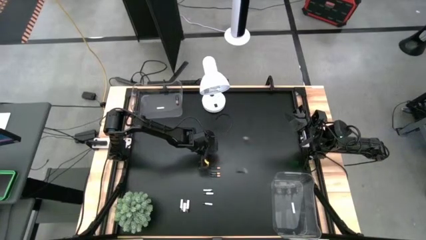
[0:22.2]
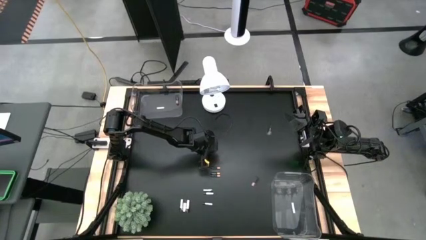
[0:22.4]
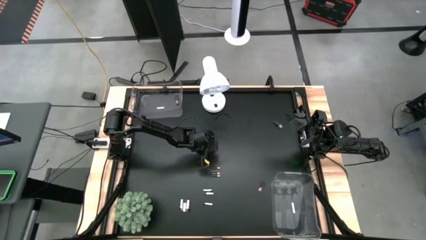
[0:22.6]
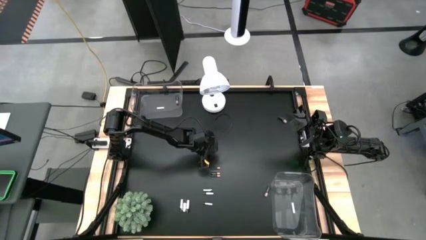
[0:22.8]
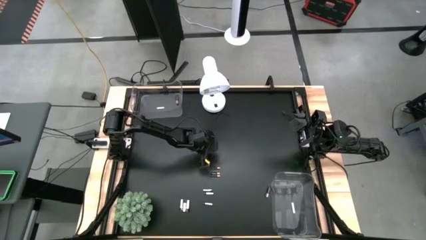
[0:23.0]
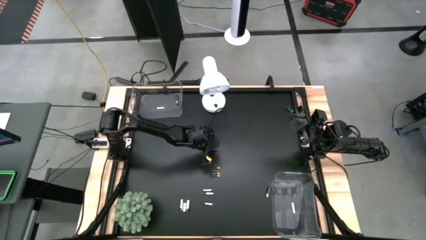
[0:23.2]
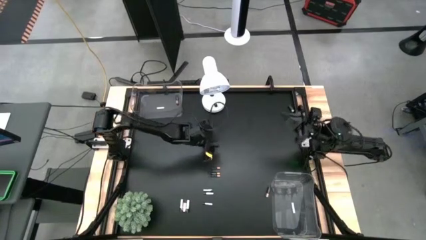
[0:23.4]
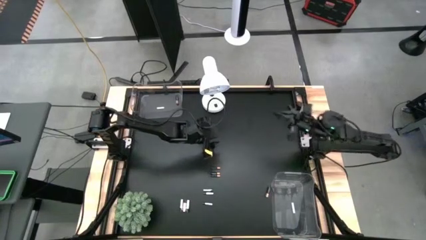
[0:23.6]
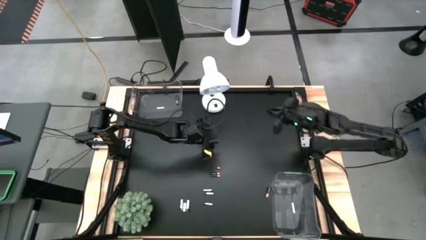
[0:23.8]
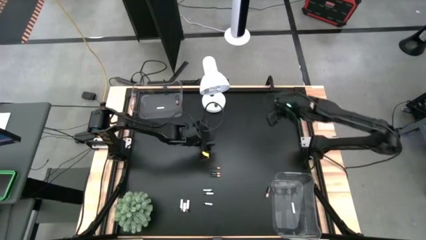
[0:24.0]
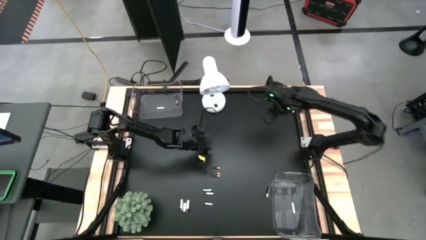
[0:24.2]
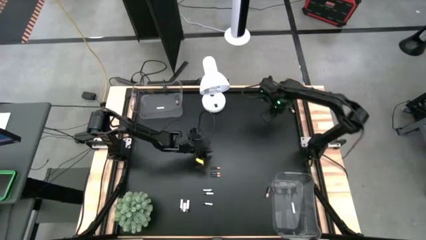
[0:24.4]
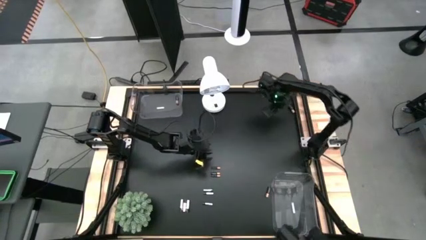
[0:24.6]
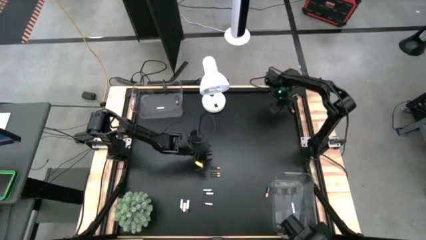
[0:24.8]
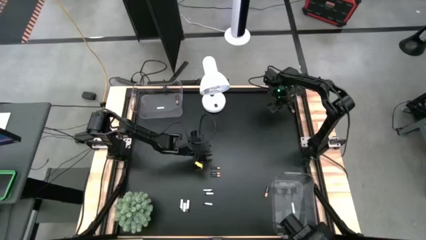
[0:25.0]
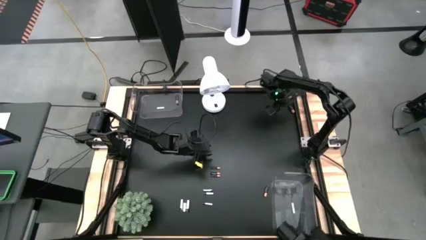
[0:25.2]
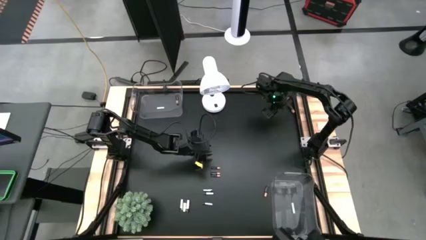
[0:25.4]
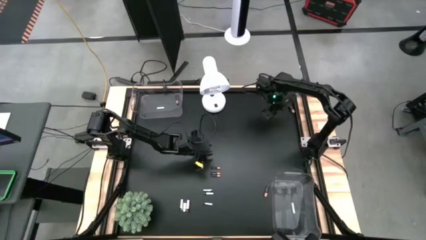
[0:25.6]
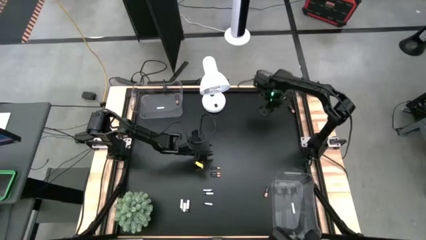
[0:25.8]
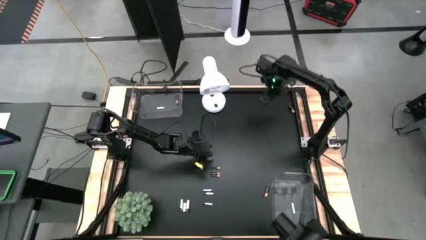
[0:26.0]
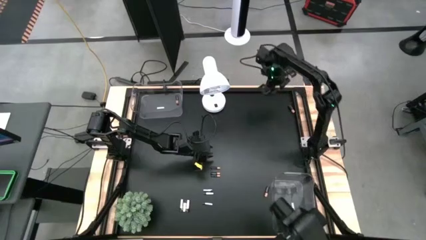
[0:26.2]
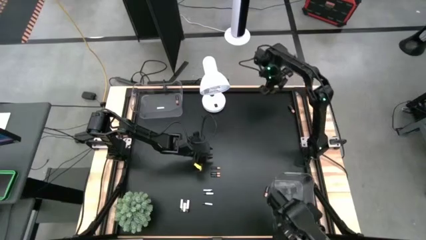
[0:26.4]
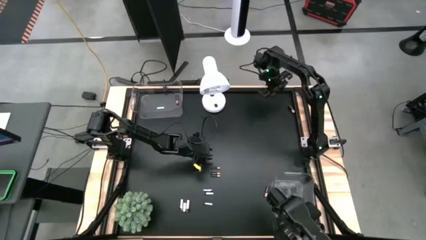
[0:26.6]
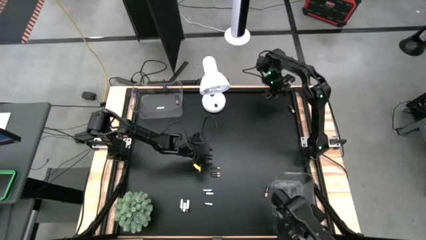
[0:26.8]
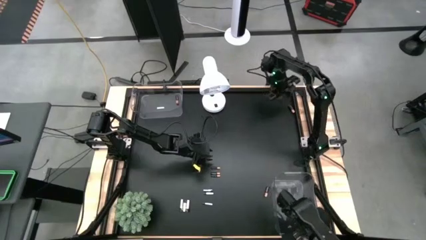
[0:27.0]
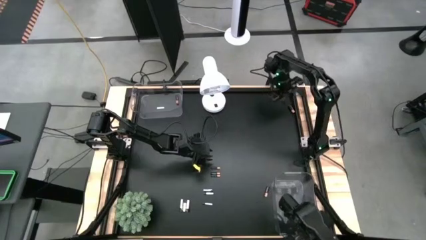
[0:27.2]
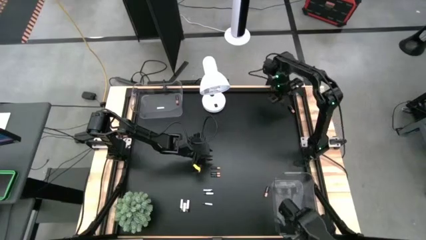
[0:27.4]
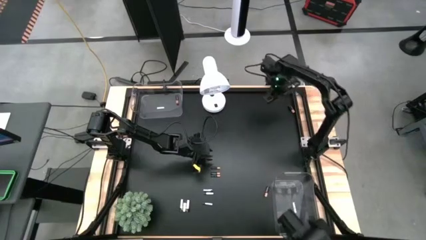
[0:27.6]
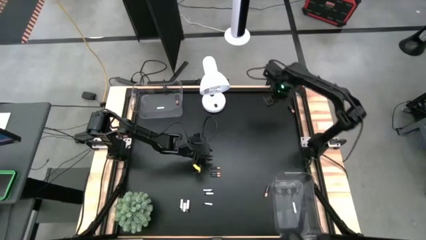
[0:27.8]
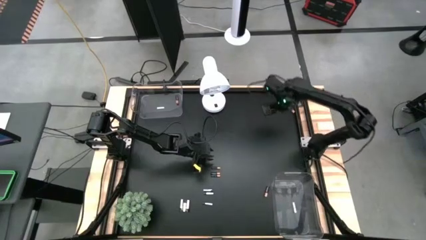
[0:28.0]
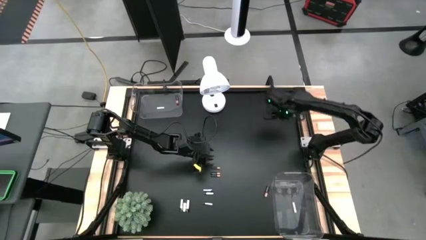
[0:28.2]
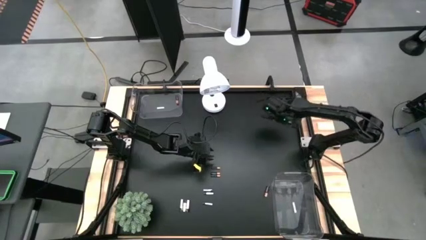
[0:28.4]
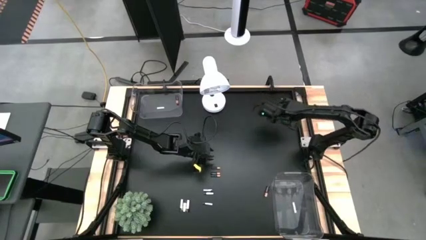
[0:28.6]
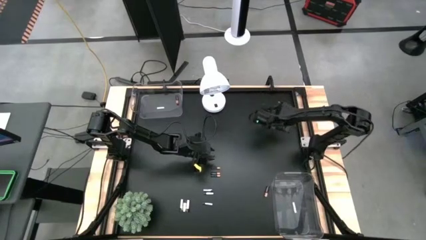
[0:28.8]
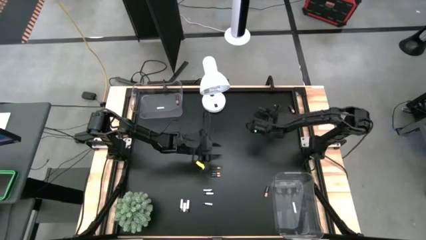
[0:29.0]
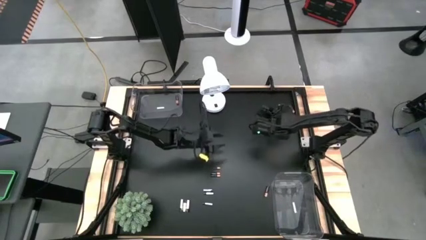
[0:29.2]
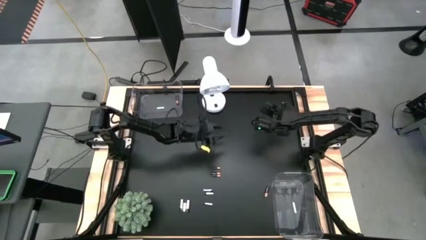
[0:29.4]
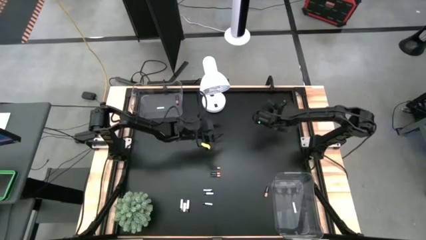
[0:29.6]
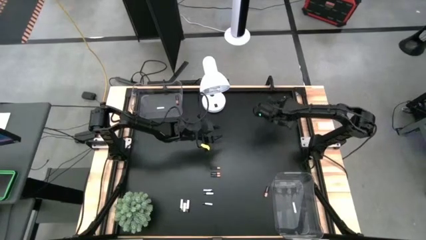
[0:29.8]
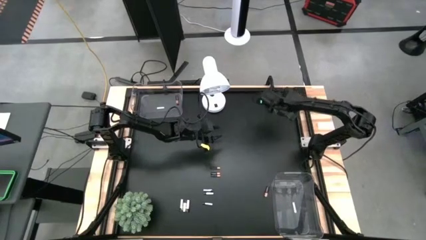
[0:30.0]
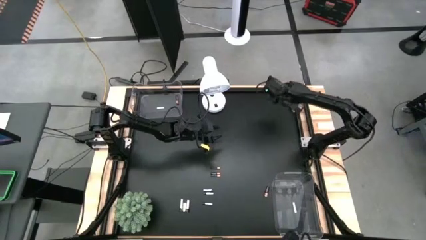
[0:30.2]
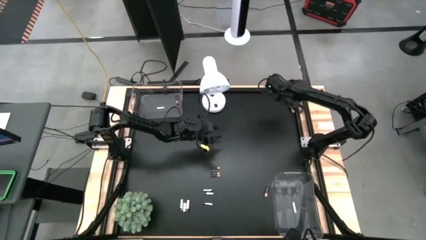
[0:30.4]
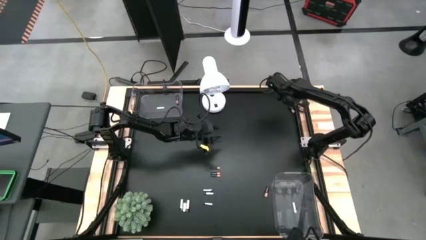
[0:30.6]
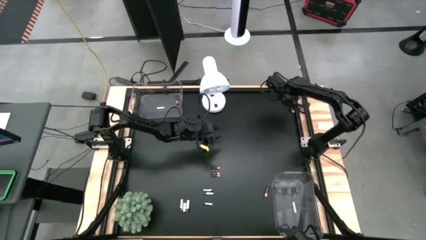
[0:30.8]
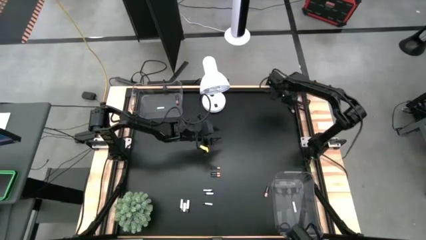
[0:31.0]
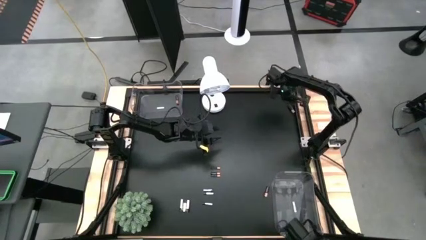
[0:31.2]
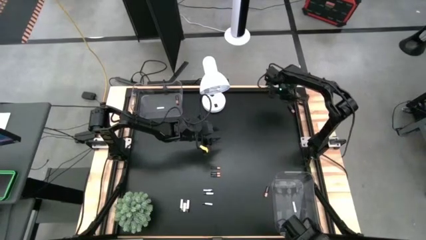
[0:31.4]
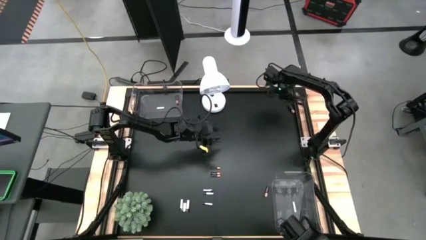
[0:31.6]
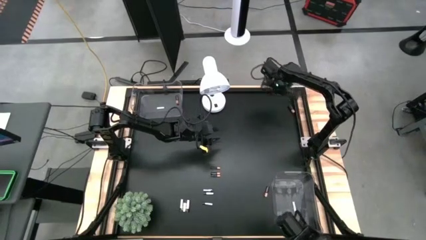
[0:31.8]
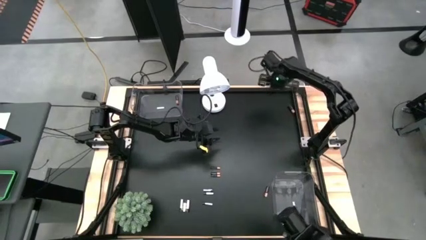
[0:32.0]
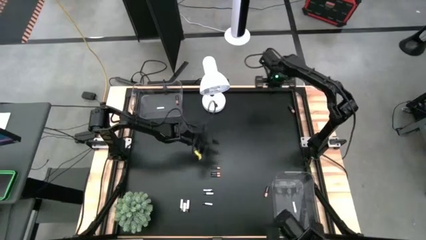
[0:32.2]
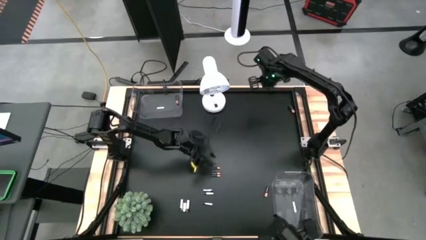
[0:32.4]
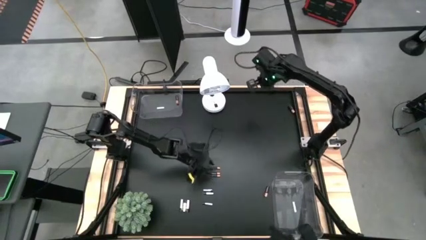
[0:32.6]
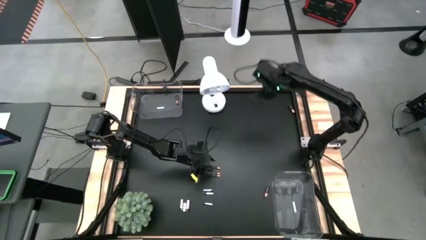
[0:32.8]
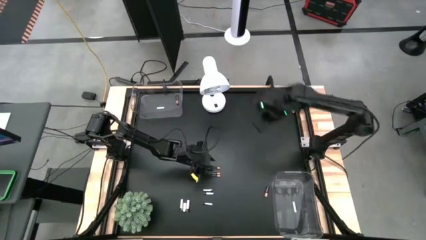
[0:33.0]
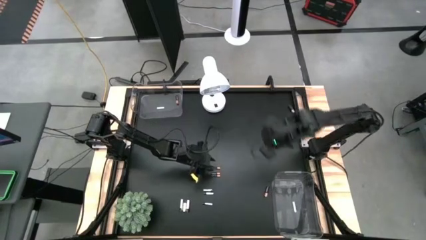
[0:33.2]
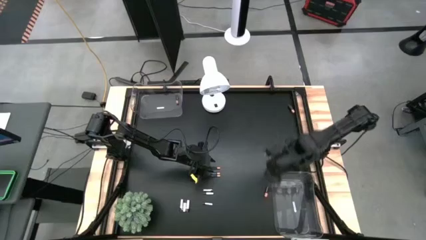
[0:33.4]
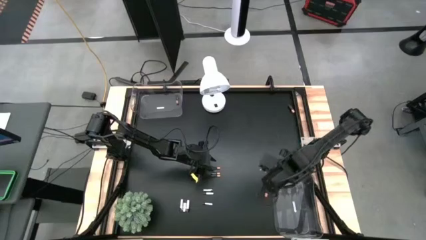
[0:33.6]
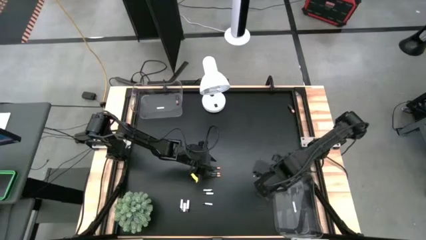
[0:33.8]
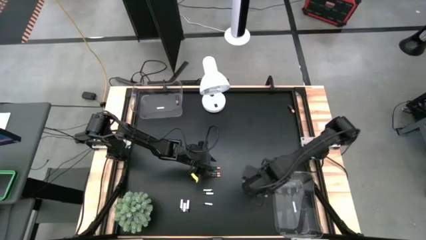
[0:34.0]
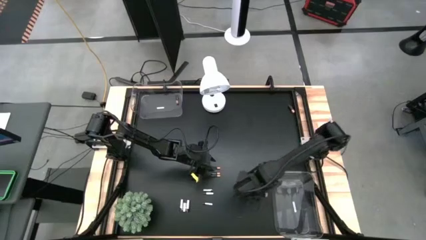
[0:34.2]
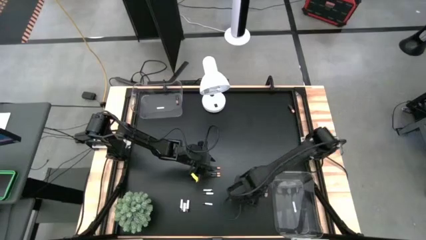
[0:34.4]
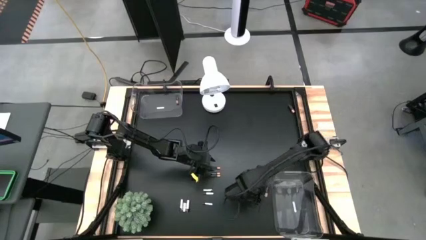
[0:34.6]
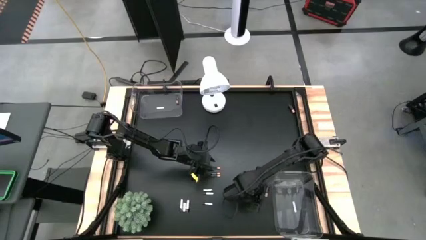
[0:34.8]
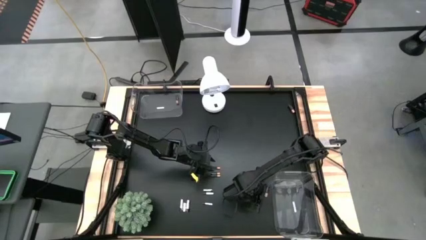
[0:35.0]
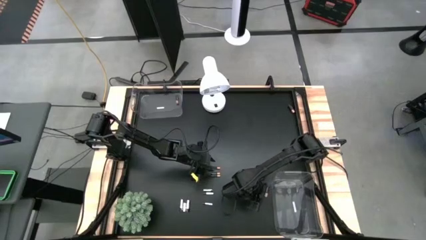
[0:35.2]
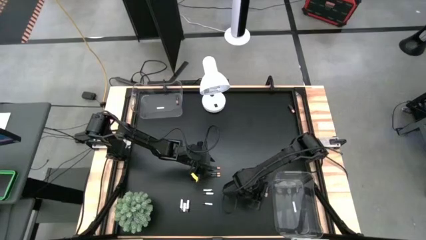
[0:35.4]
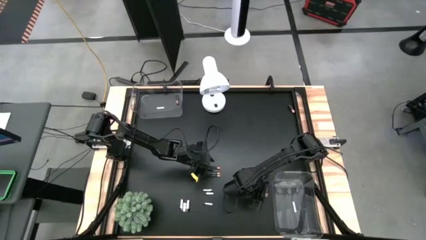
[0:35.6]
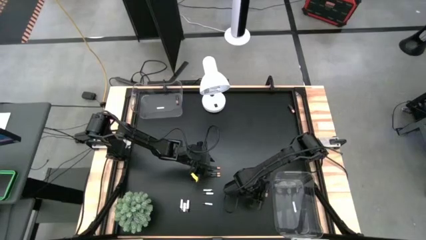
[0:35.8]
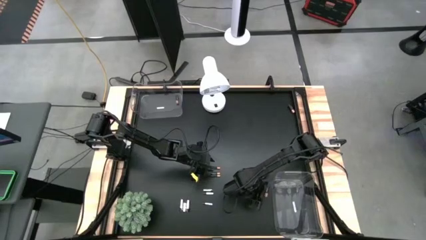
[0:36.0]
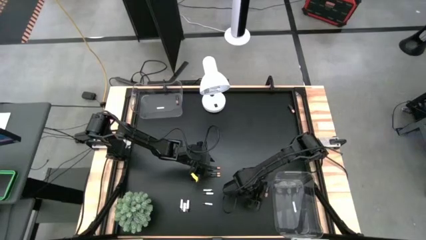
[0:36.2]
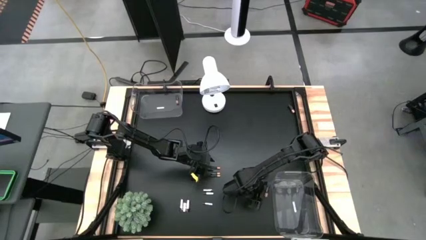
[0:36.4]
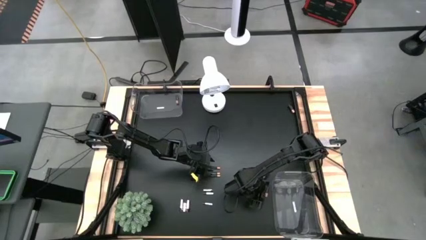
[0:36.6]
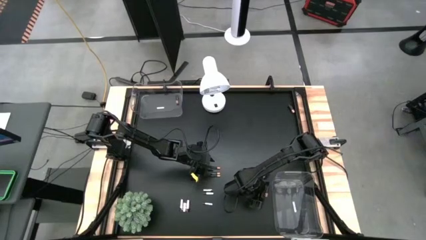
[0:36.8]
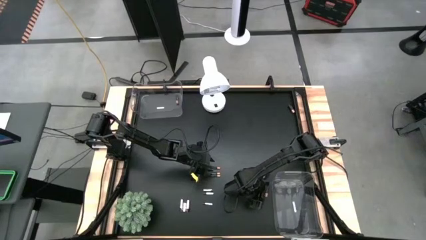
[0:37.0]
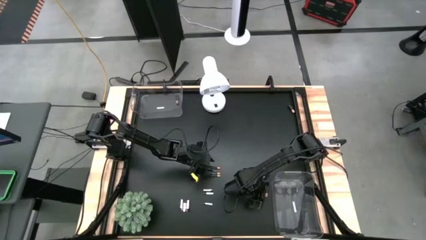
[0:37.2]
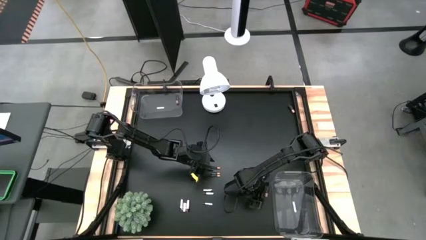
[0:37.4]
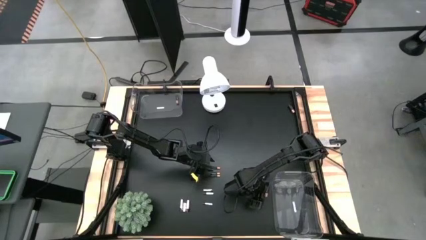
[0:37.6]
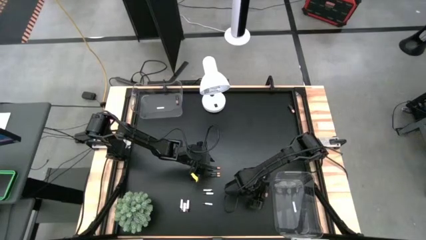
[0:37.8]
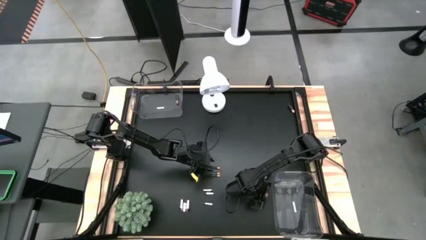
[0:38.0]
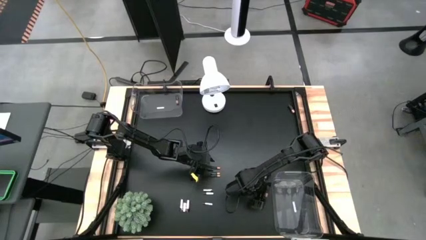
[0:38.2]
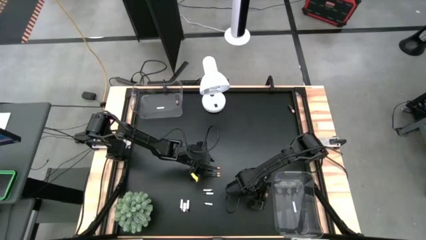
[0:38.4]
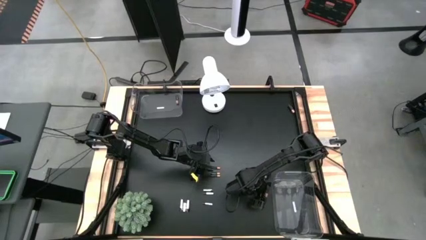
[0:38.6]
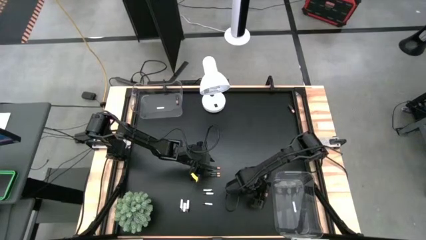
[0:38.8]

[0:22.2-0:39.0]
Task: Sort batteries
Put the black battery into the top transparent bin
